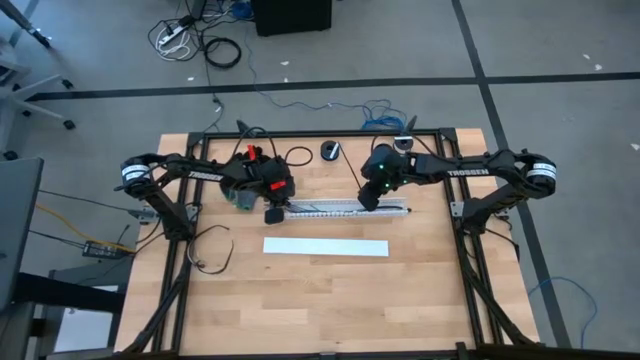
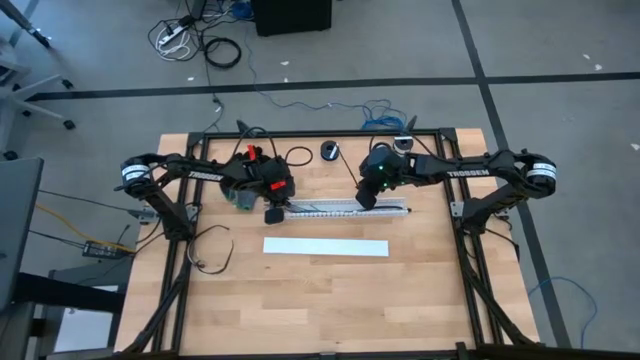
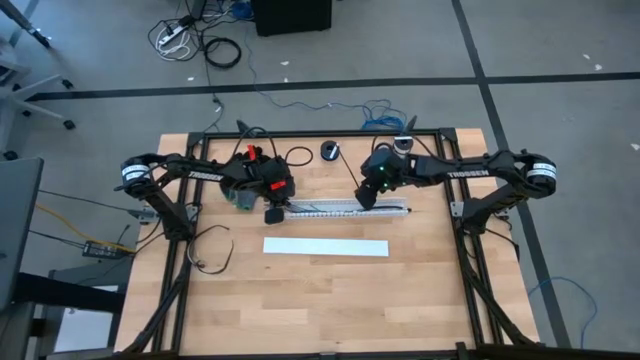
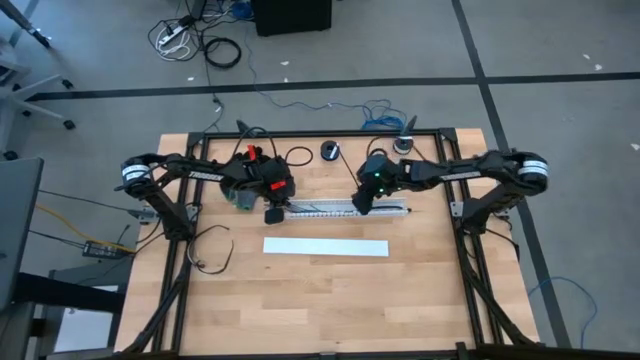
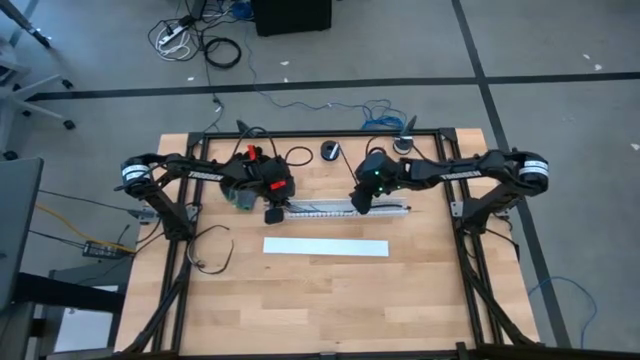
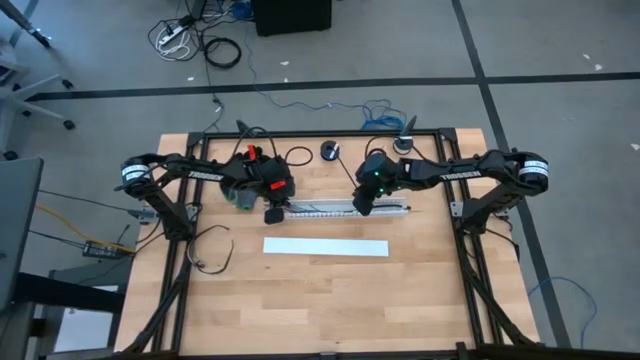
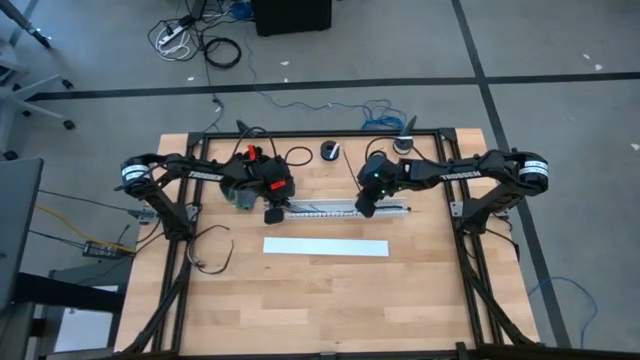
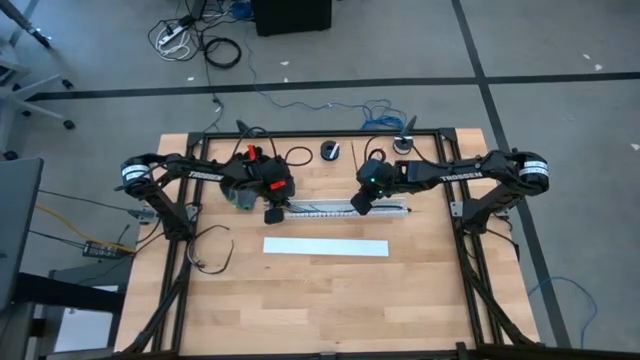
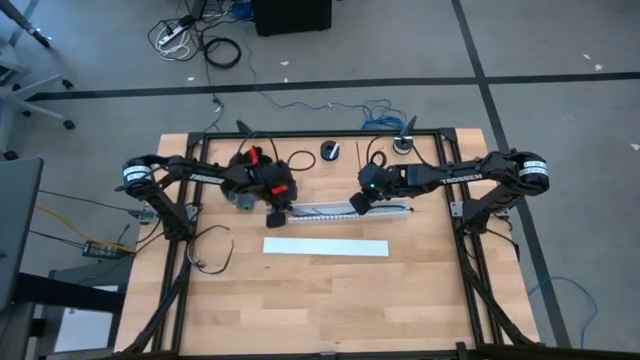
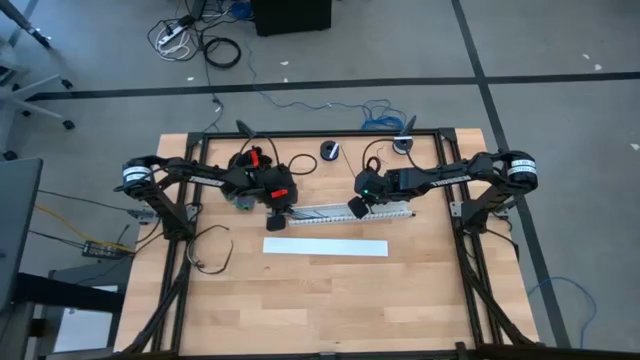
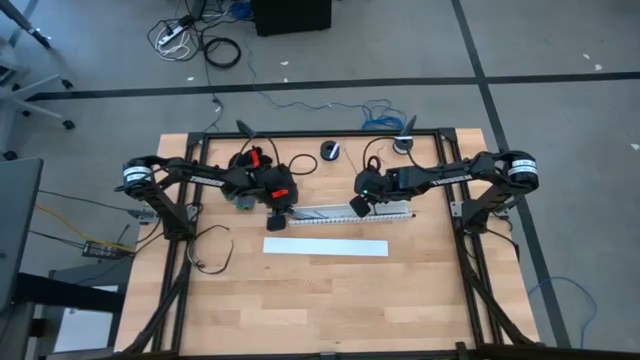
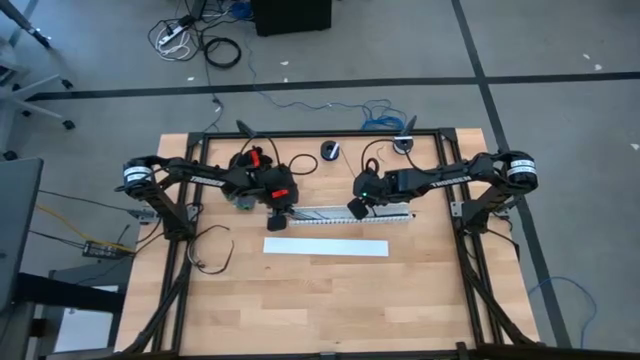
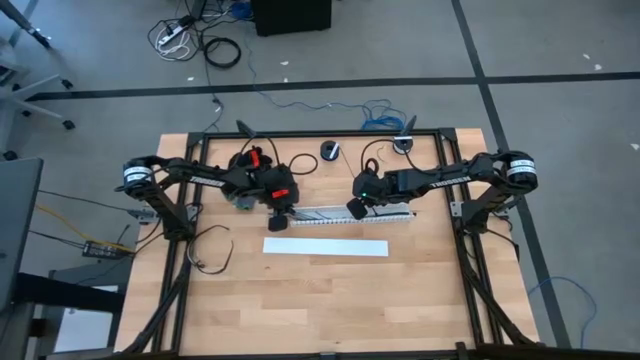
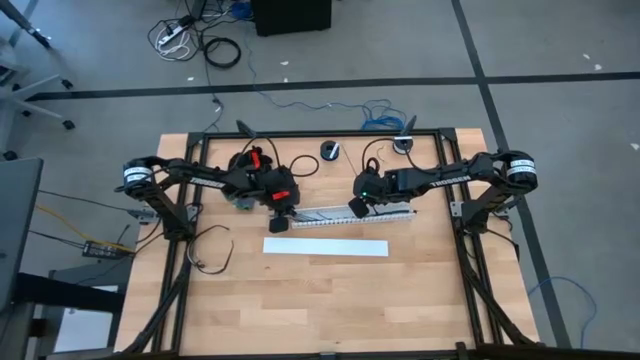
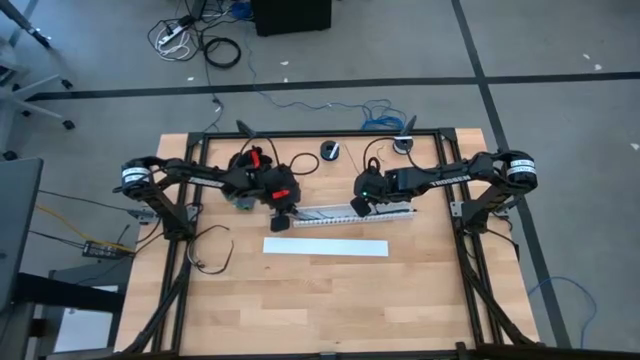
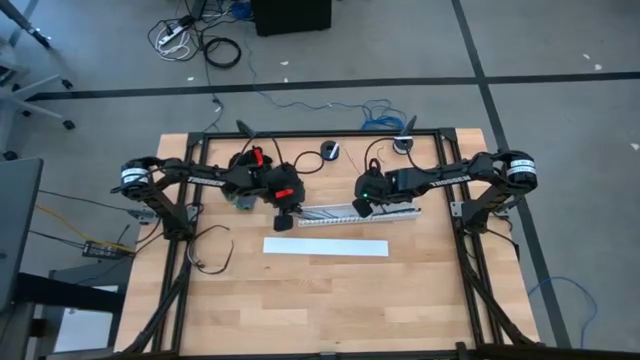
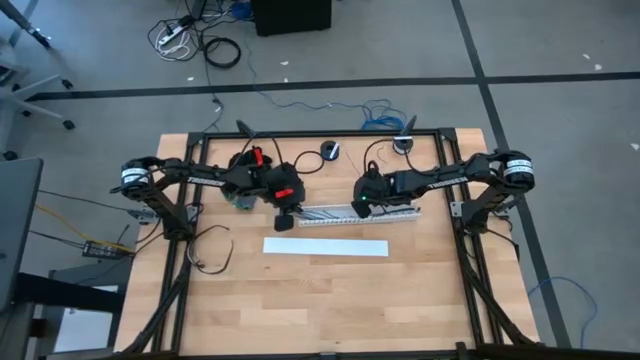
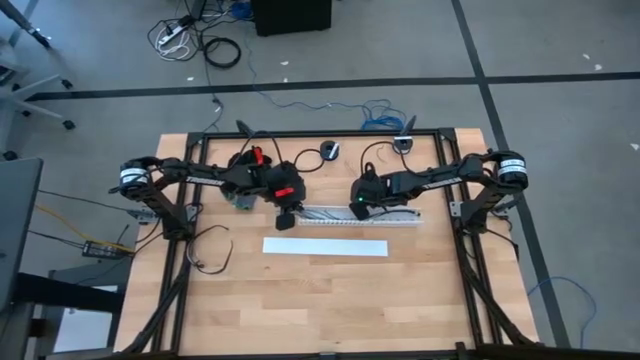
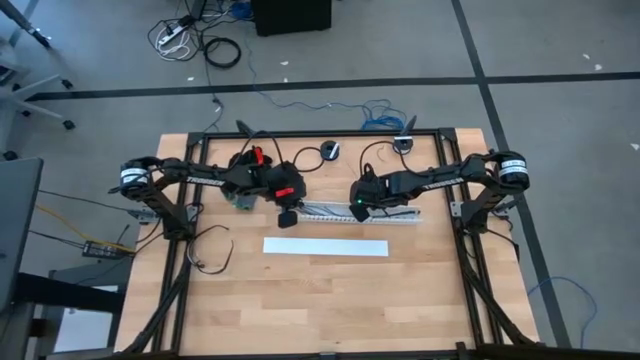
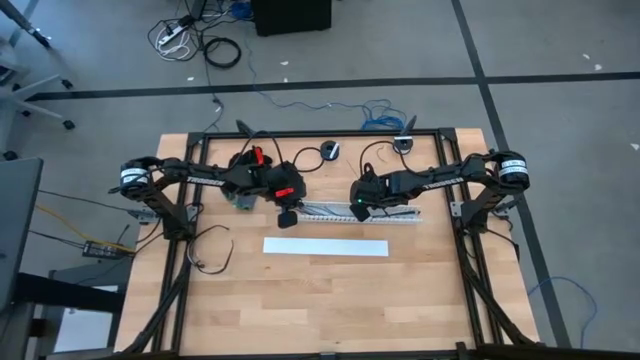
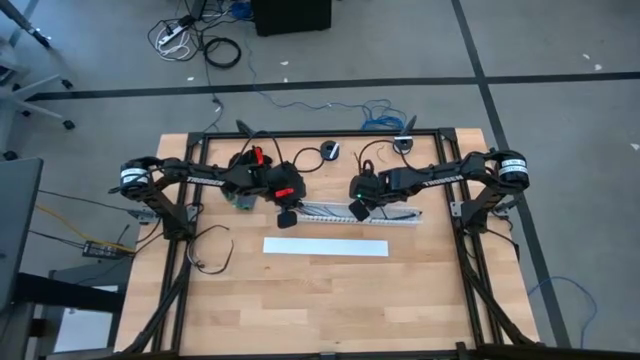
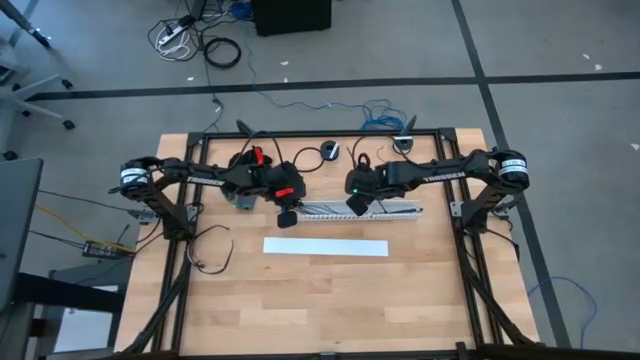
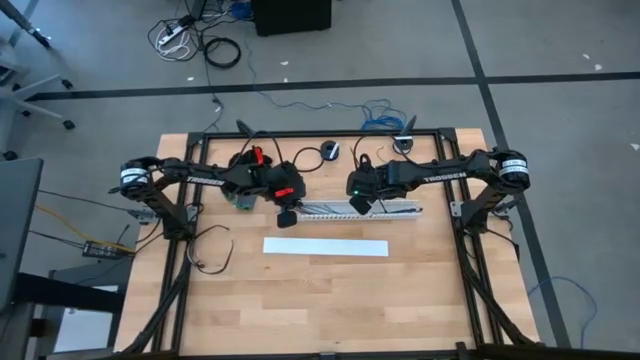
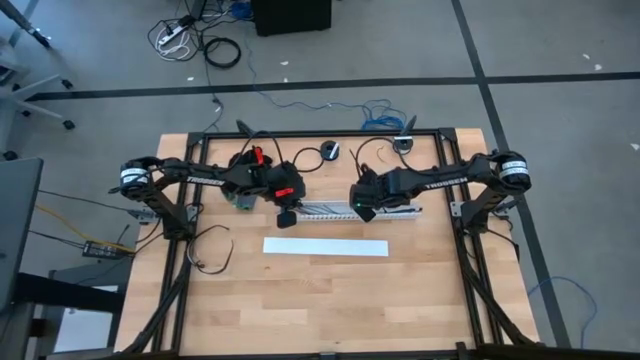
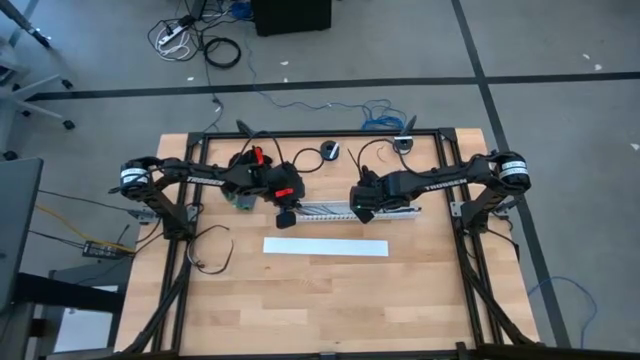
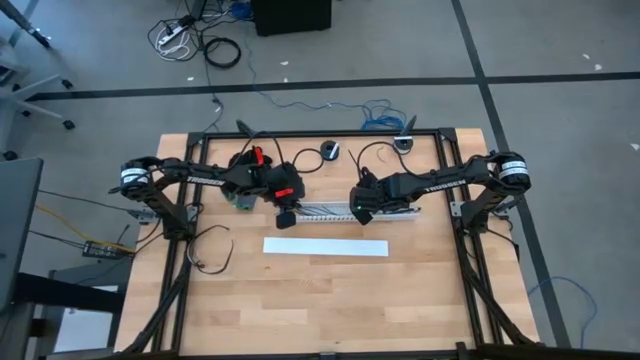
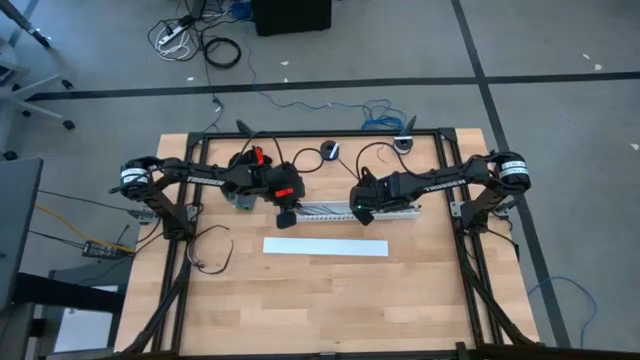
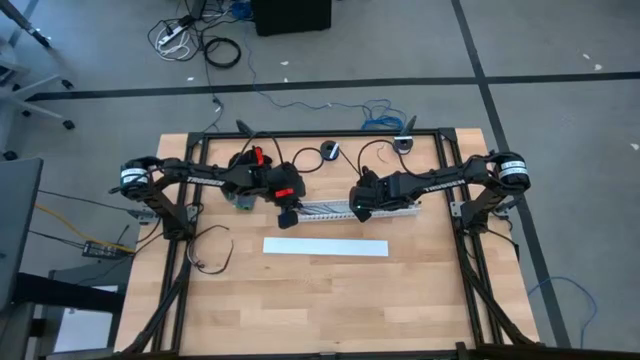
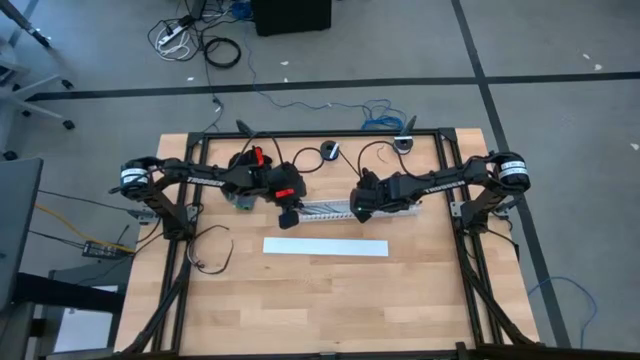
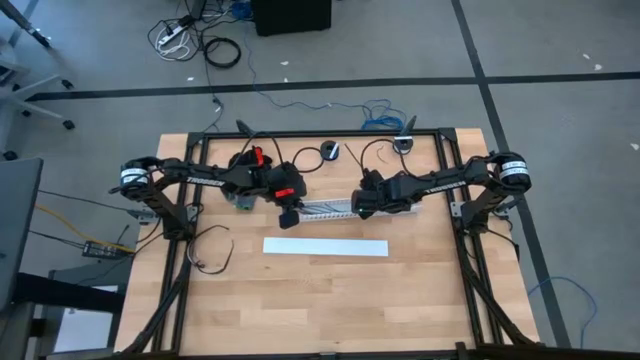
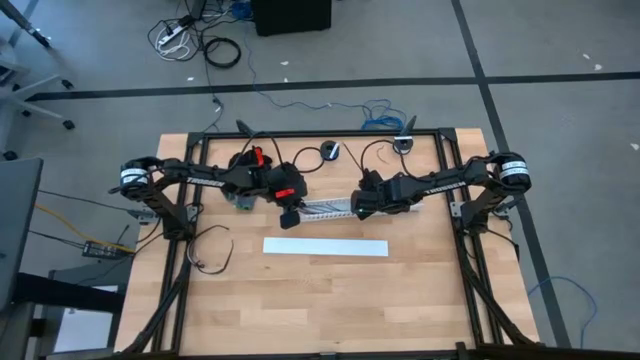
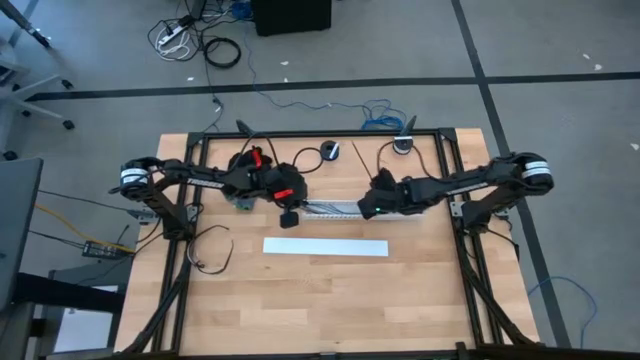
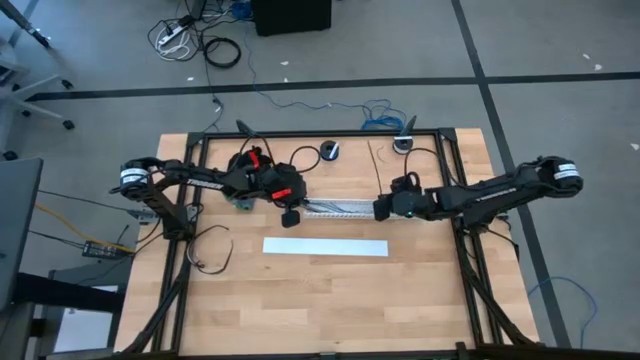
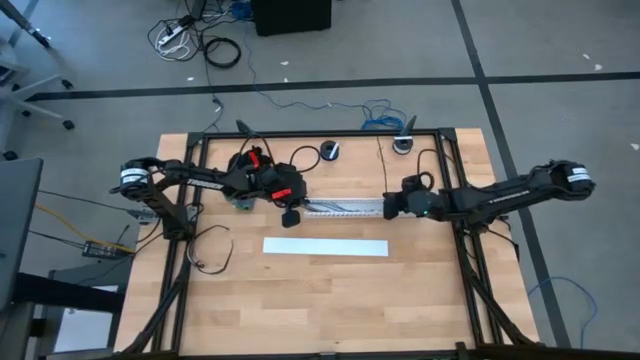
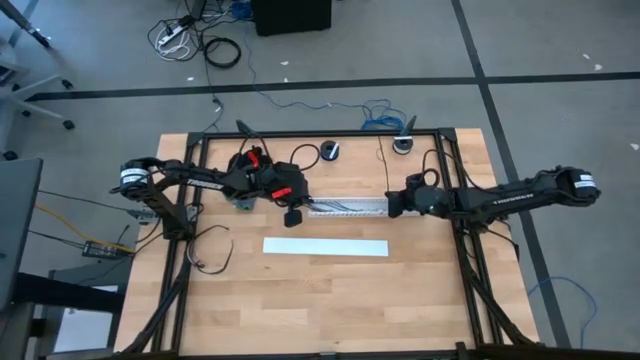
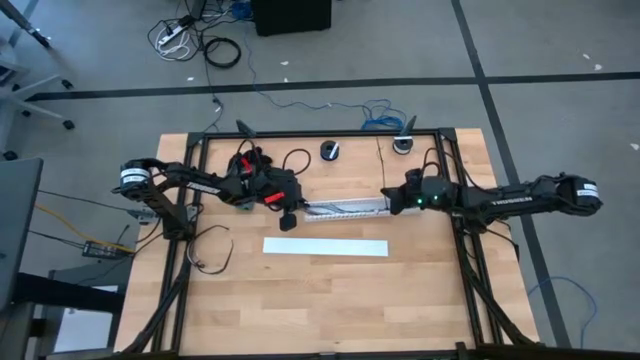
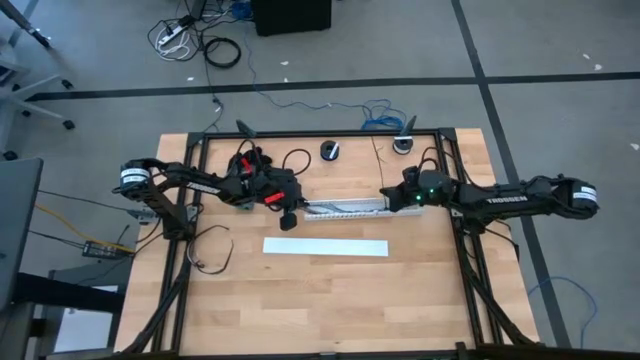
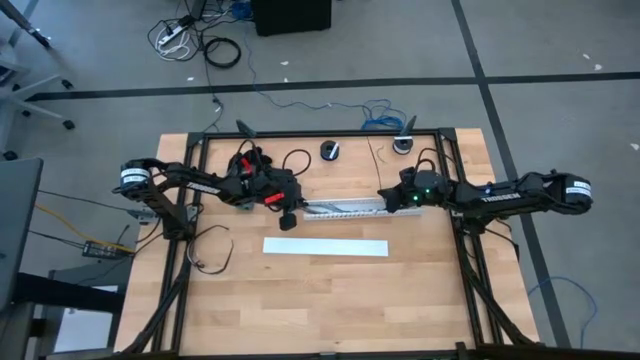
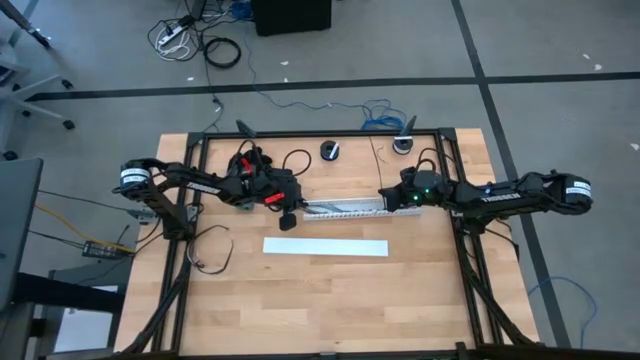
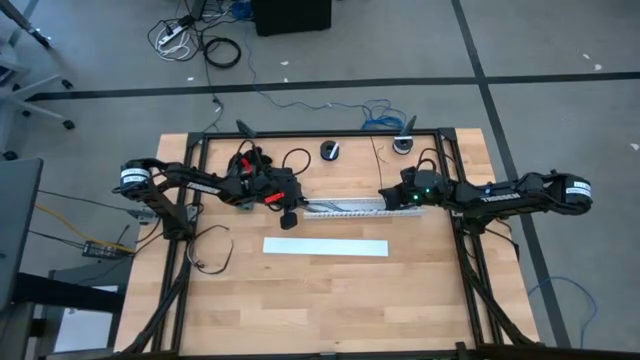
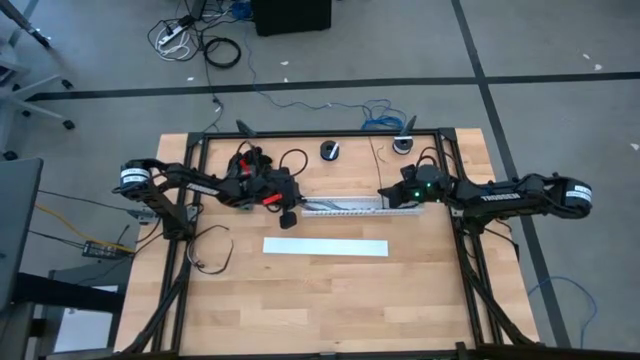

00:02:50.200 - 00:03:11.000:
Task: Ziptie cables
Put the ziptied cables into the white cable duct
